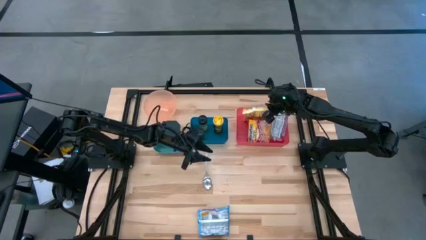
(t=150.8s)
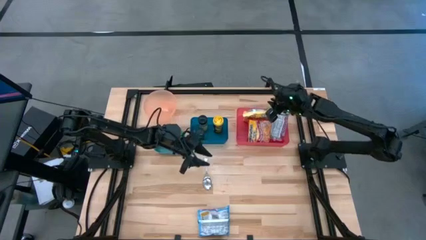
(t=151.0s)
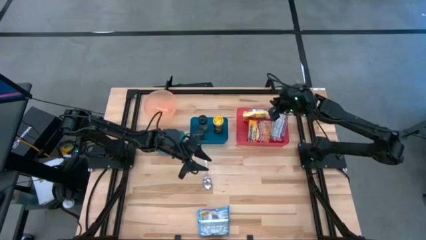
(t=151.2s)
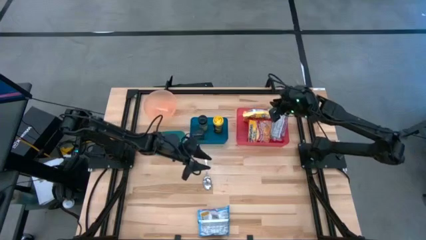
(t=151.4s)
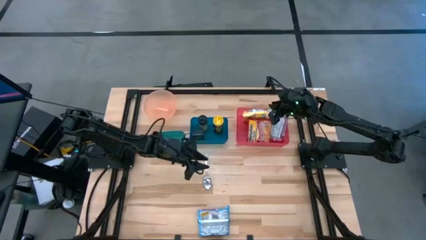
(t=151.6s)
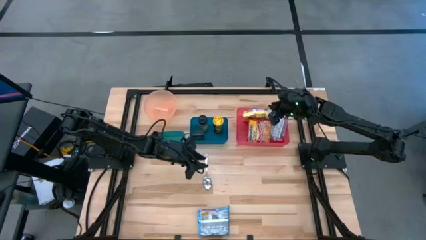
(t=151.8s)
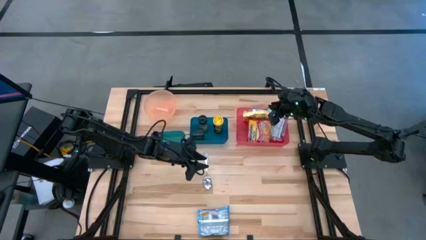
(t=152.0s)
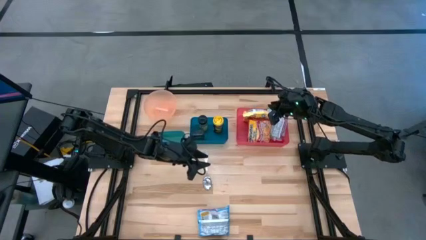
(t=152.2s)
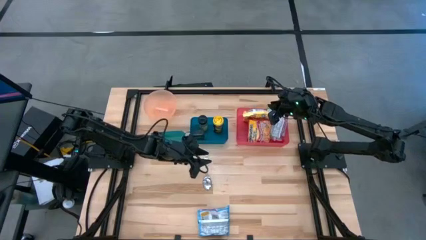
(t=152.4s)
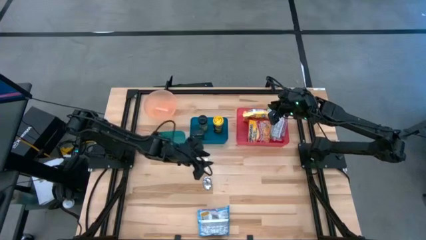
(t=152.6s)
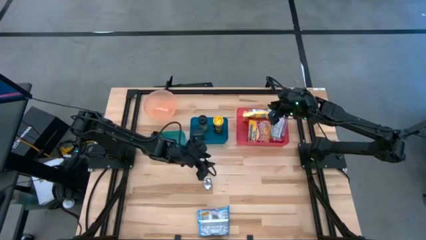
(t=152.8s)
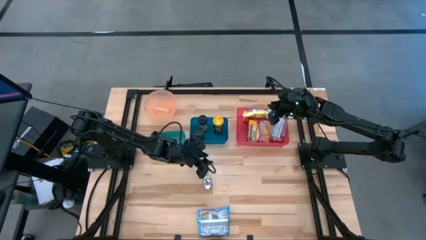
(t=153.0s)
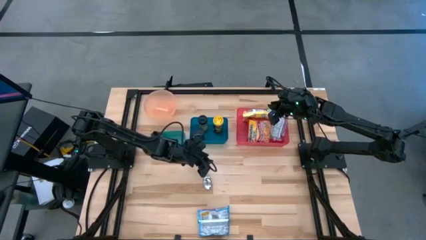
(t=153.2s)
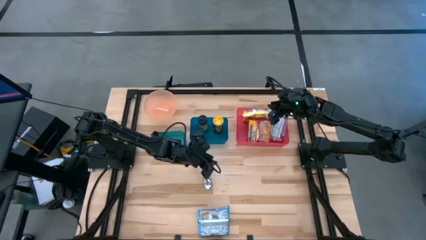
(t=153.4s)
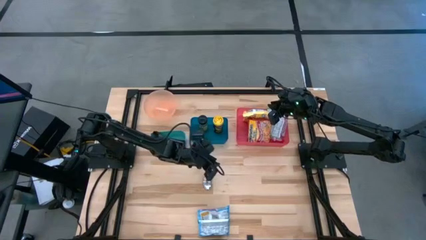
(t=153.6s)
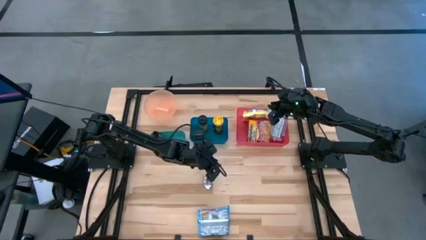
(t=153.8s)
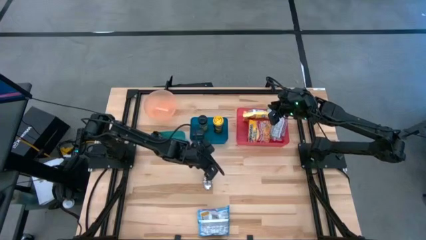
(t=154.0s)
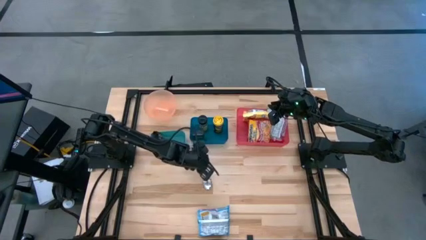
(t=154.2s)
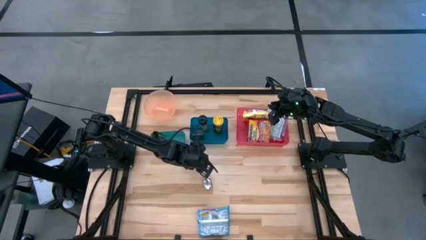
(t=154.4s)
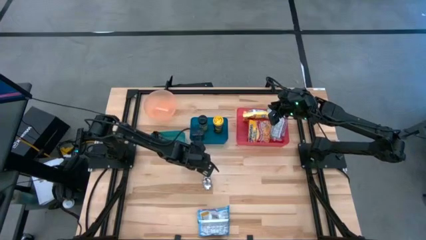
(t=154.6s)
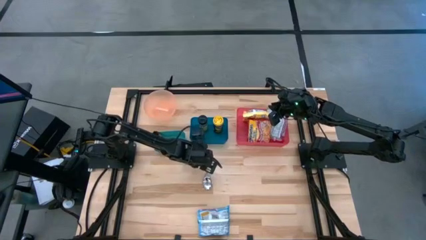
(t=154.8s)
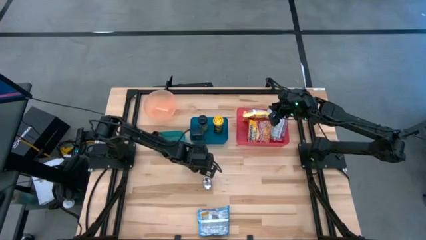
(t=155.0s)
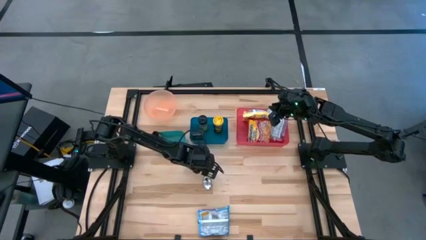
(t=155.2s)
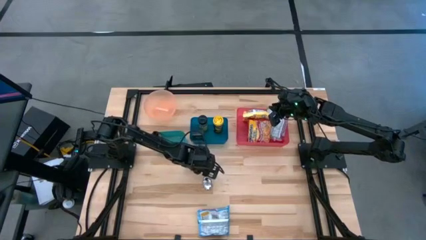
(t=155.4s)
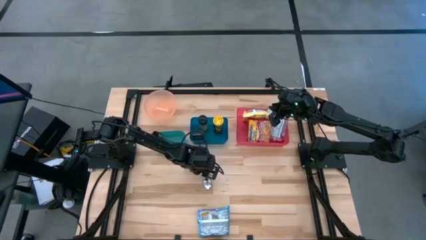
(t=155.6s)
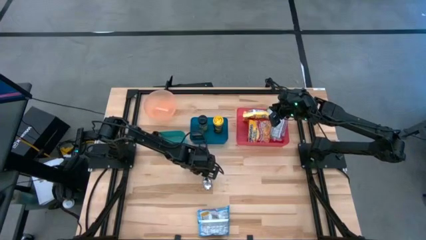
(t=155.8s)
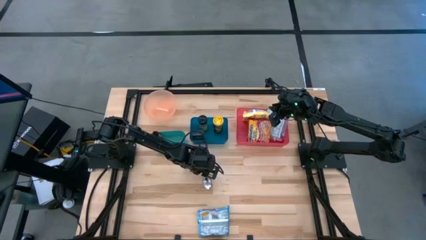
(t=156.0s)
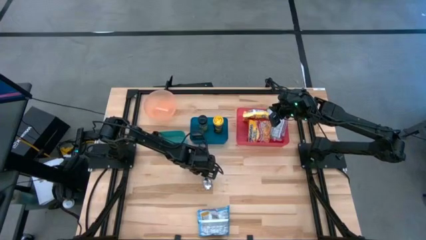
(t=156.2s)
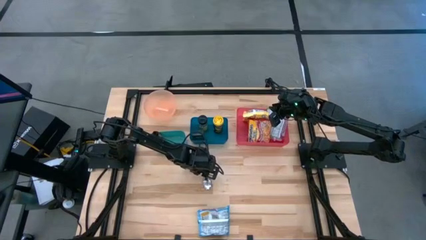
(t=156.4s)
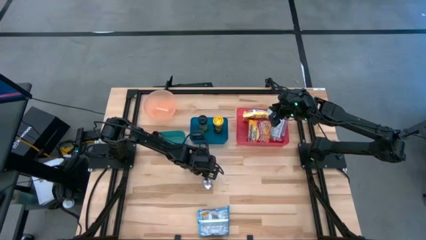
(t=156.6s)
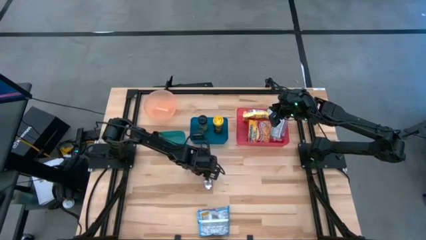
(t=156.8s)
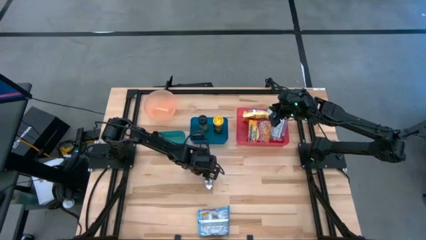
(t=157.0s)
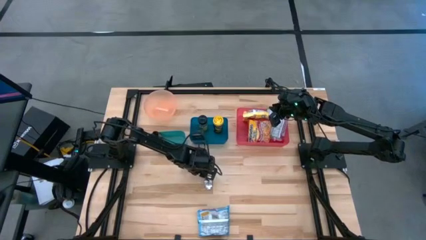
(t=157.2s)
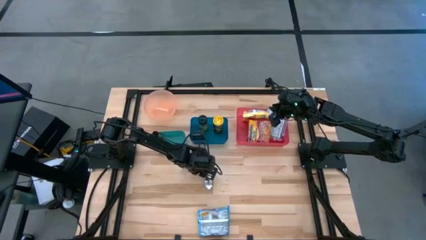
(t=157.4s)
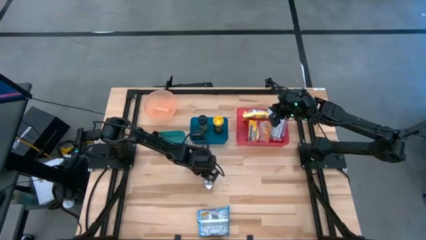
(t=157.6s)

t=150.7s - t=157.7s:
Task: Pick & Place Food Item
Put the silver spoon into the green bin

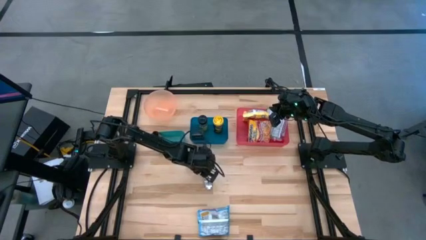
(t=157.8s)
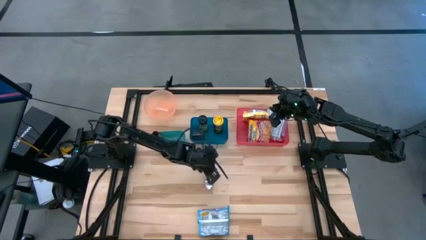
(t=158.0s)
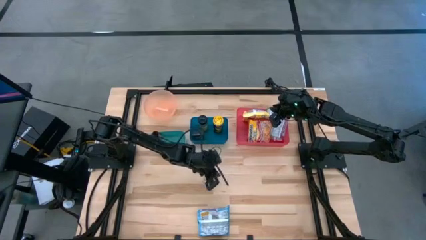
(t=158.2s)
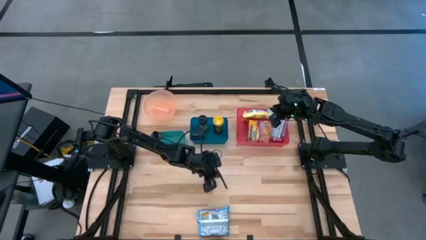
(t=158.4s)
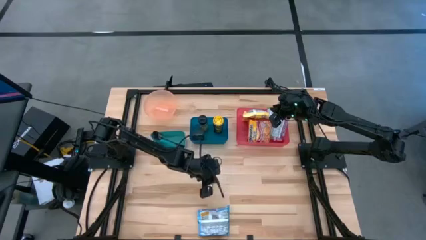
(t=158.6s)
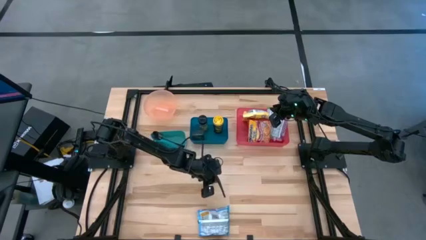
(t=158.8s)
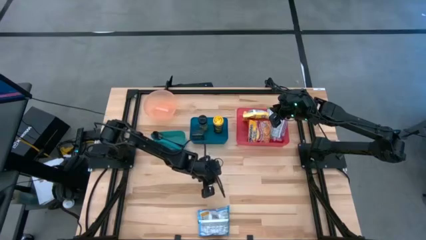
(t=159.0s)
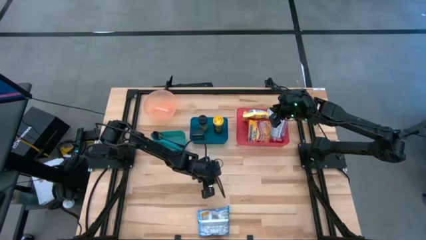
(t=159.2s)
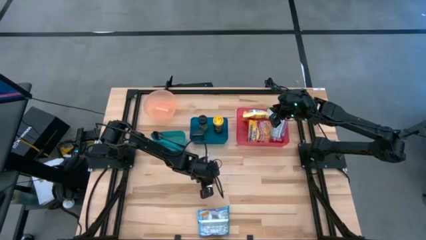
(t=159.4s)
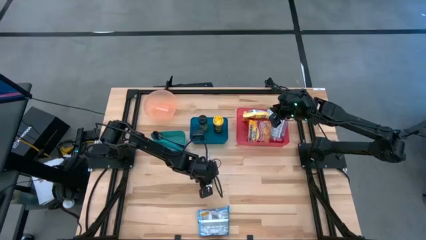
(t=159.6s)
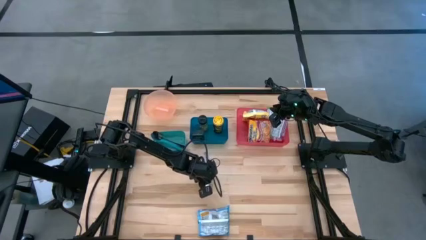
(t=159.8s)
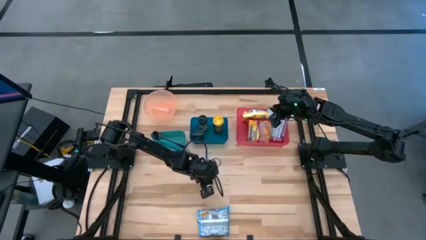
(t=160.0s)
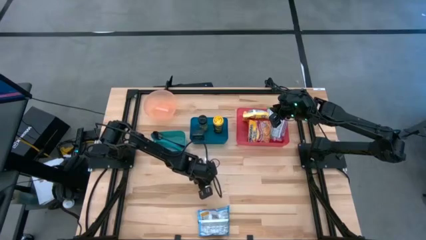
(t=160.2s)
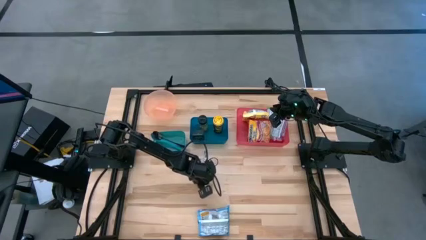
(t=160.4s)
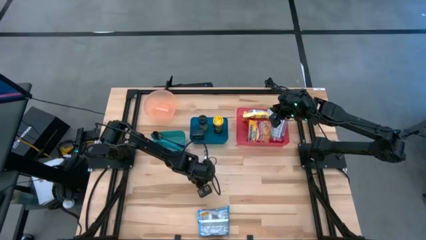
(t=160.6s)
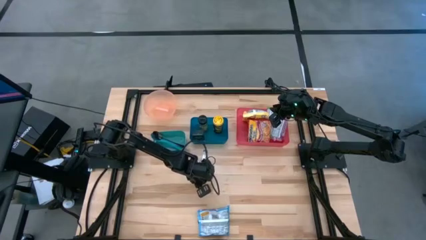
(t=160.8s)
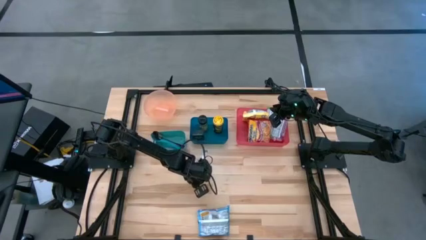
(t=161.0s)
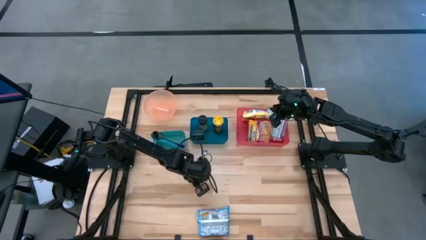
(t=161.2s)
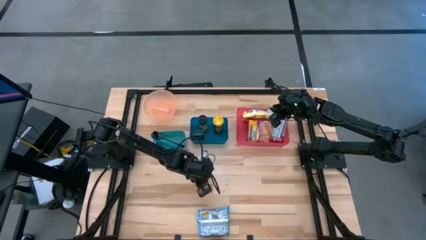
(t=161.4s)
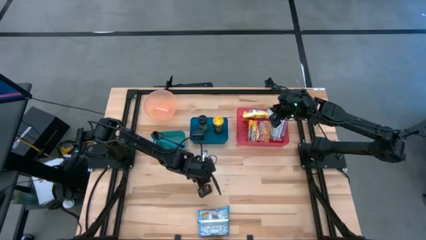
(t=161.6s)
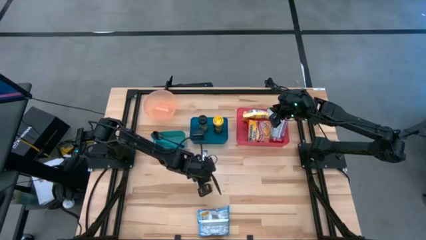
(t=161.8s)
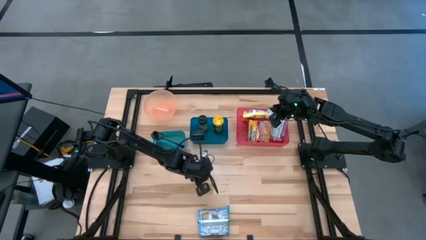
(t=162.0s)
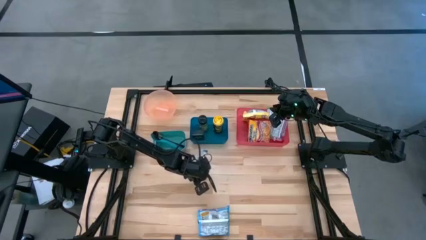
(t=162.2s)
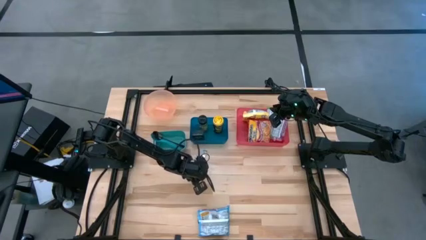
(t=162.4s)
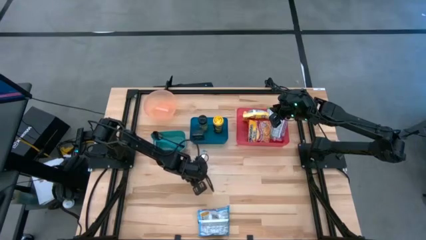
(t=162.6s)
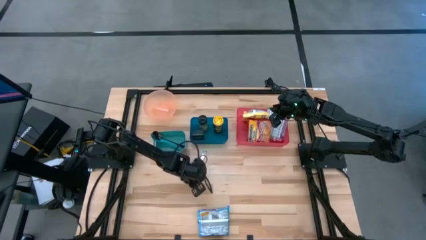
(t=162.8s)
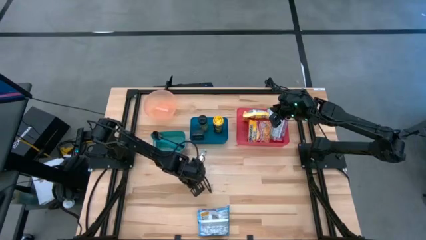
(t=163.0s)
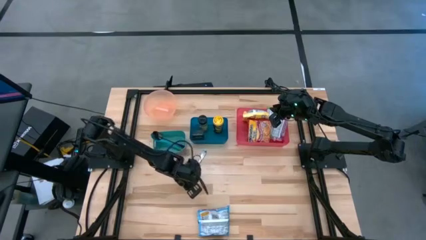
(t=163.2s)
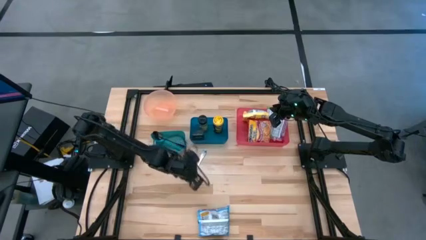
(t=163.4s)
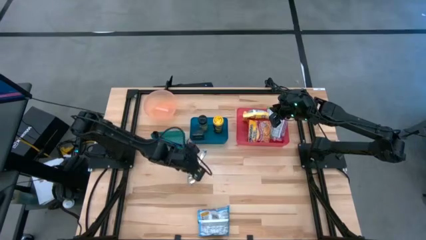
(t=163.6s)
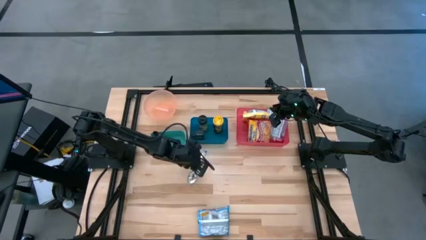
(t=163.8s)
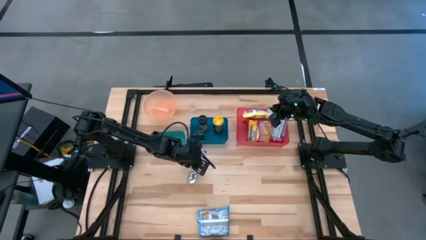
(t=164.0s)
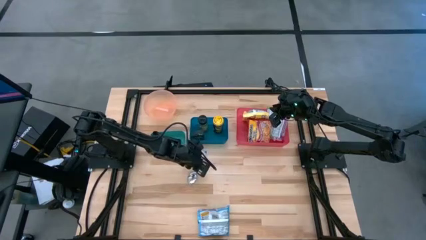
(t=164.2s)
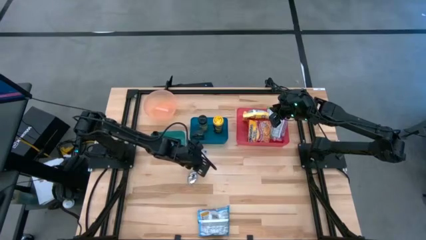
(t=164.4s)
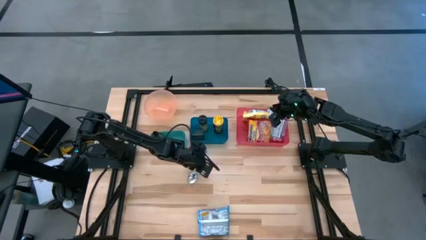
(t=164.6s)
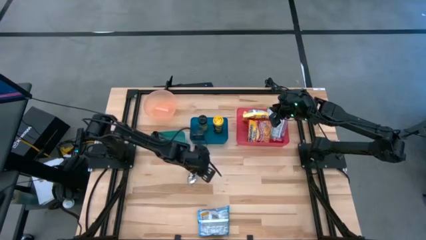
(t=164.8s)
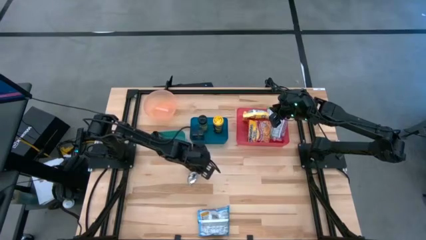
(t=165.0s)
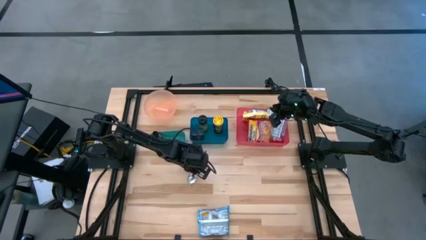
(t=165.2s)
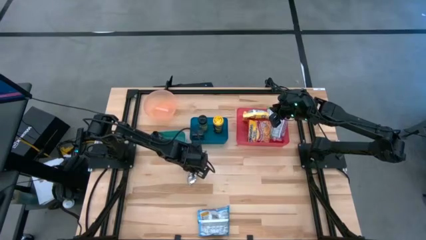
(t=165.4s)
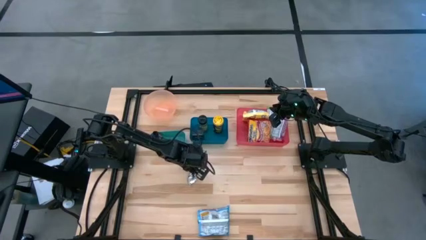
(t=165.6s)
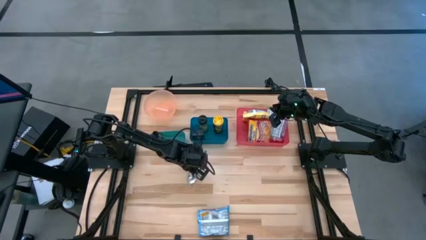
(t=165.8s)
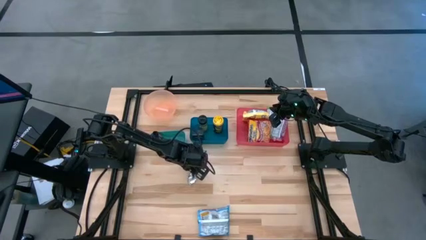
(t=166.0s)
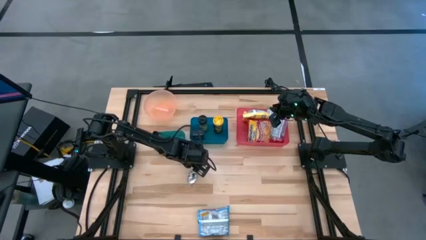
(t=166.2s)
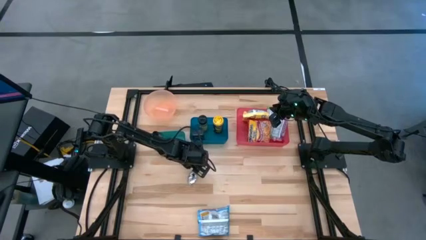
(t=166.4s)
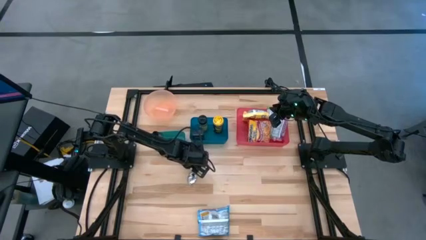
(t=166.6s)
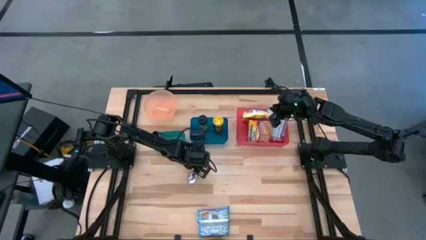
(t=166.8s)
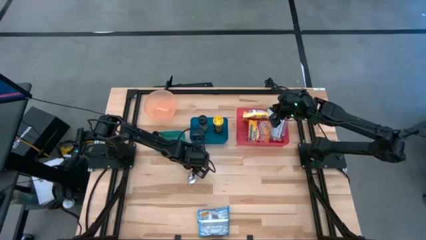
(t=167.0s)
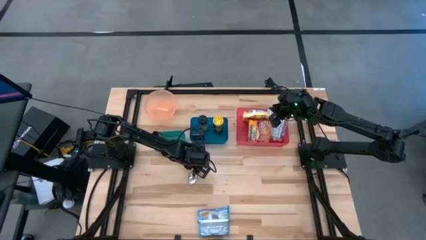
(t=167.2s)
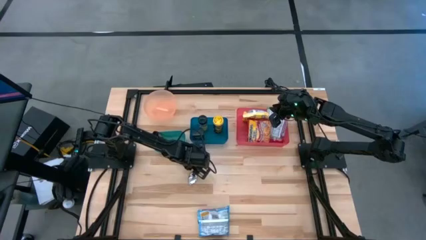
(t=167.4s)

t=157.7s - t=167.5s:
Put the silver spoon into the green bin
